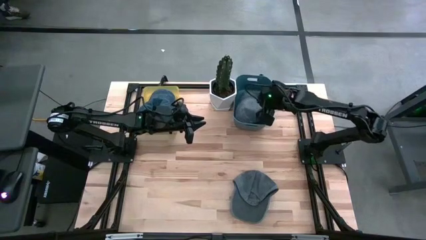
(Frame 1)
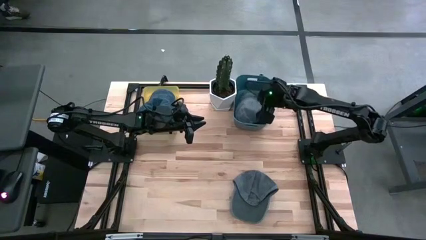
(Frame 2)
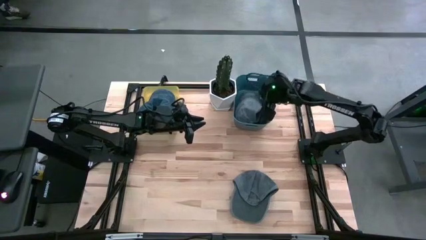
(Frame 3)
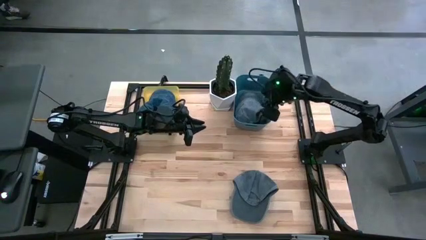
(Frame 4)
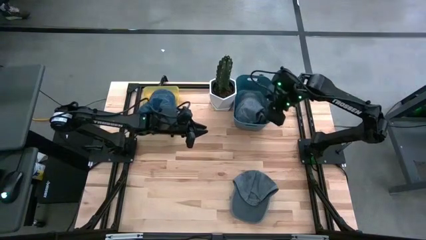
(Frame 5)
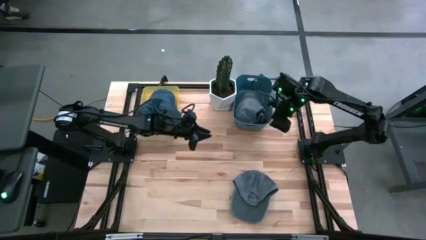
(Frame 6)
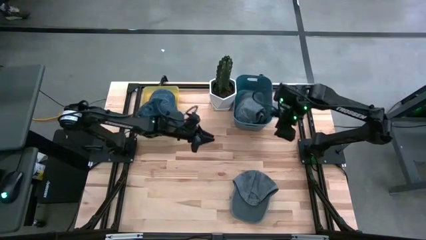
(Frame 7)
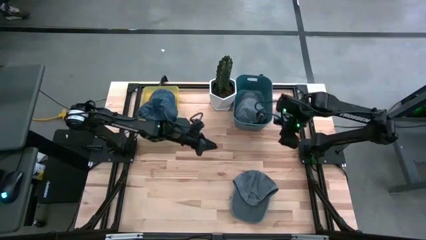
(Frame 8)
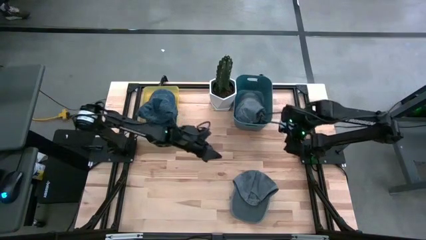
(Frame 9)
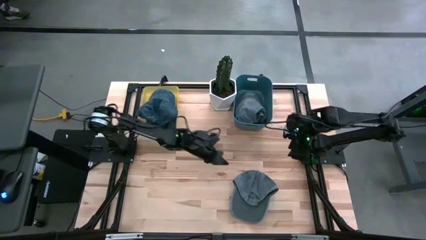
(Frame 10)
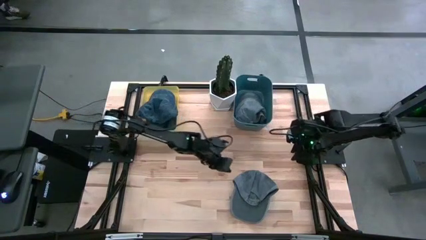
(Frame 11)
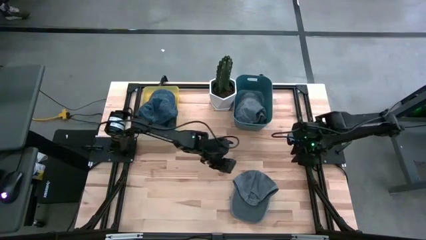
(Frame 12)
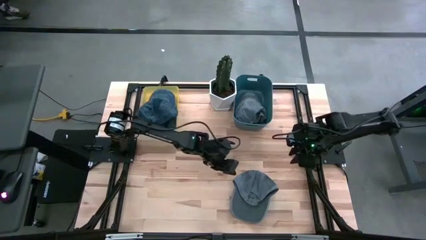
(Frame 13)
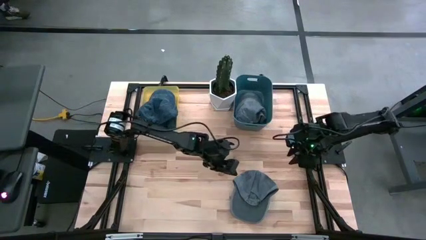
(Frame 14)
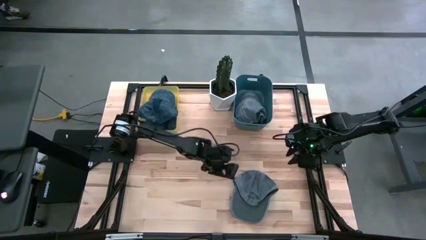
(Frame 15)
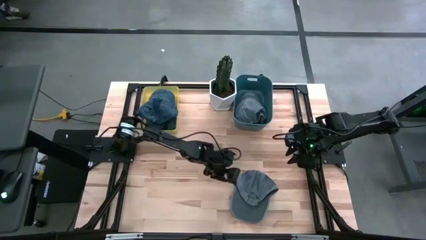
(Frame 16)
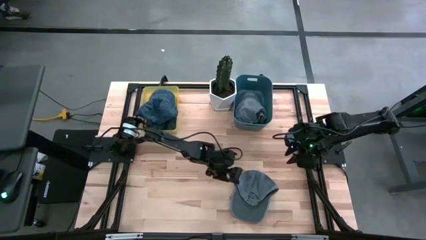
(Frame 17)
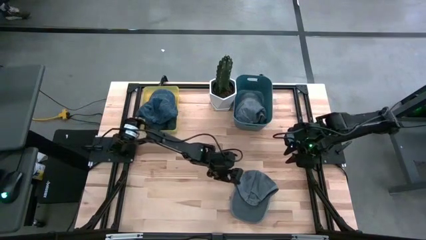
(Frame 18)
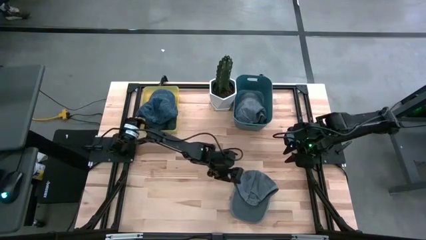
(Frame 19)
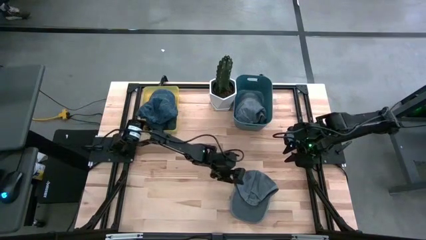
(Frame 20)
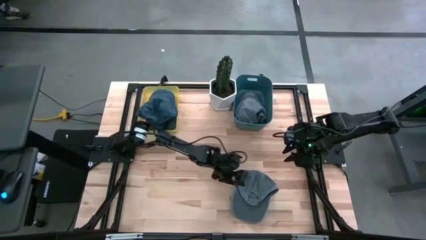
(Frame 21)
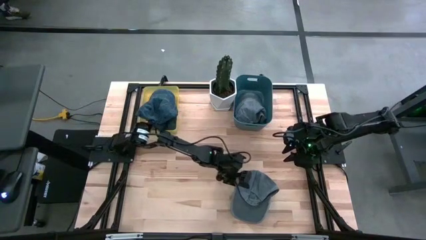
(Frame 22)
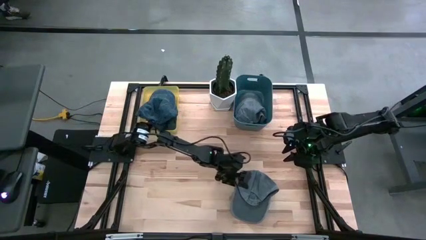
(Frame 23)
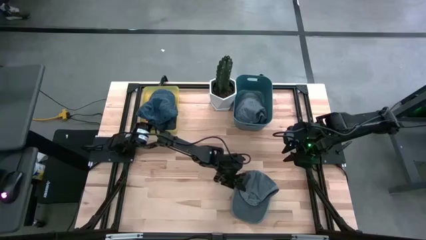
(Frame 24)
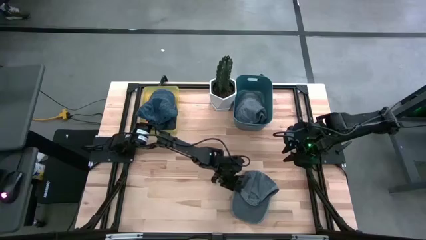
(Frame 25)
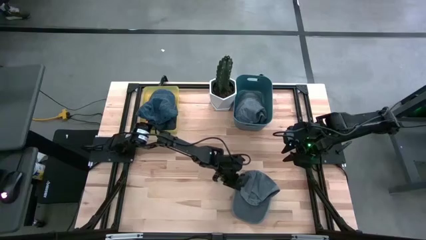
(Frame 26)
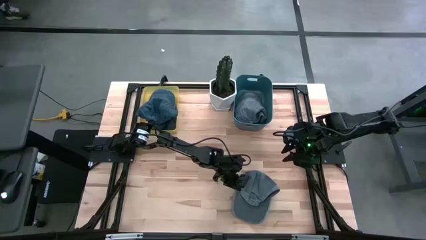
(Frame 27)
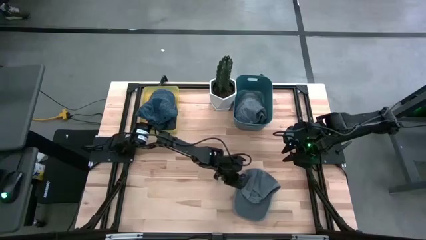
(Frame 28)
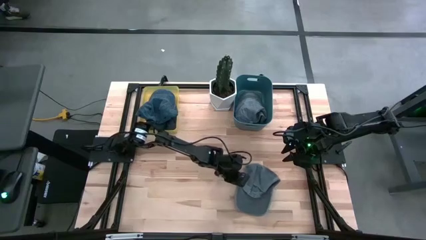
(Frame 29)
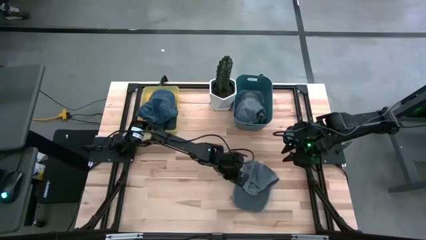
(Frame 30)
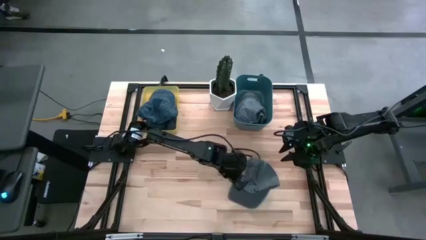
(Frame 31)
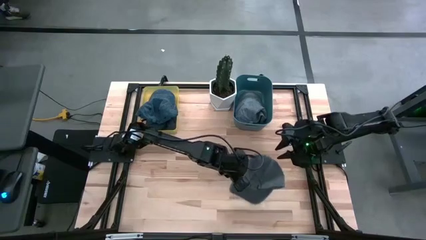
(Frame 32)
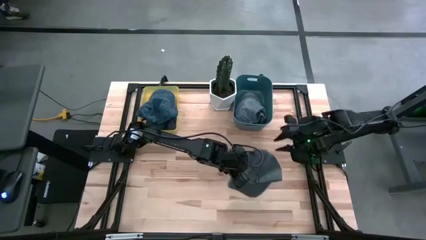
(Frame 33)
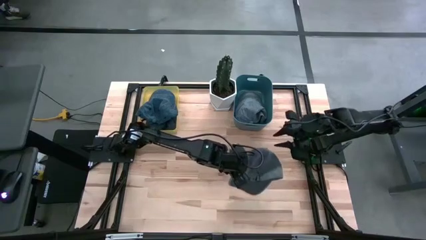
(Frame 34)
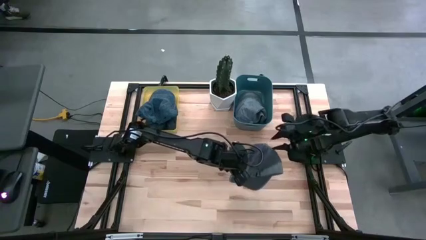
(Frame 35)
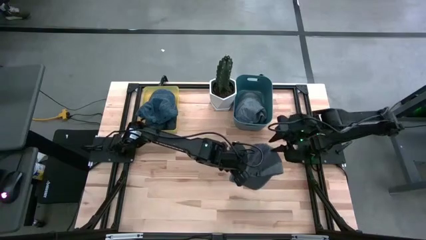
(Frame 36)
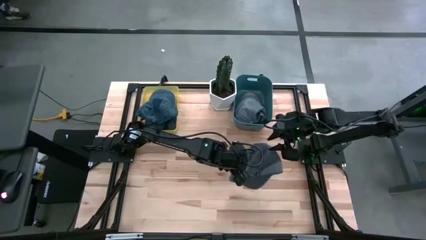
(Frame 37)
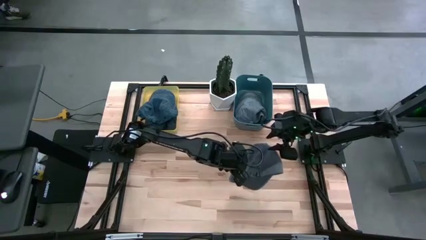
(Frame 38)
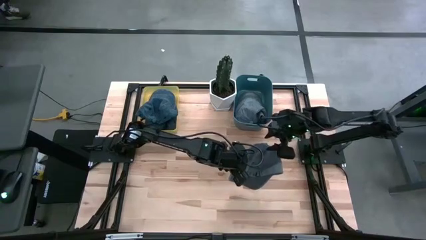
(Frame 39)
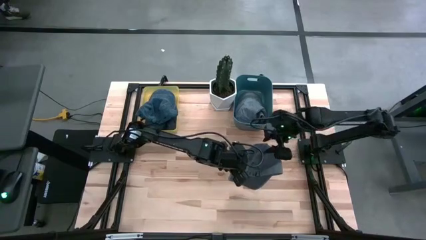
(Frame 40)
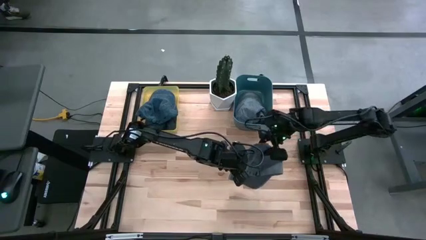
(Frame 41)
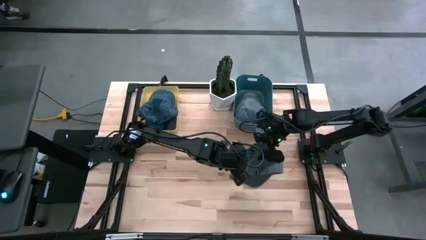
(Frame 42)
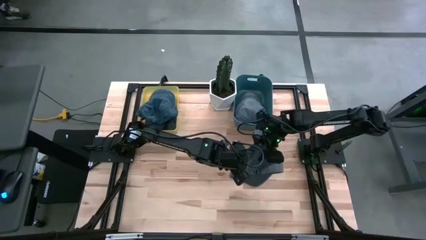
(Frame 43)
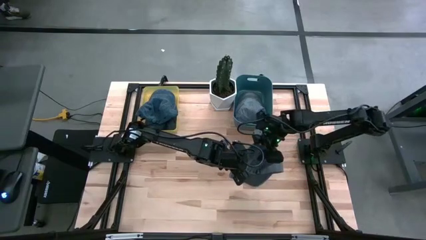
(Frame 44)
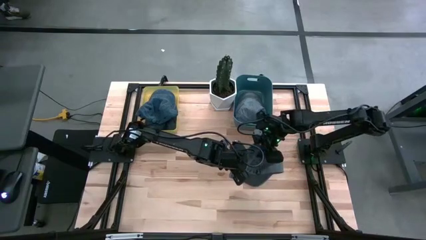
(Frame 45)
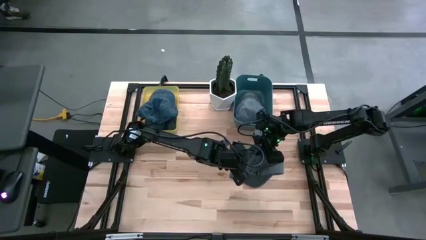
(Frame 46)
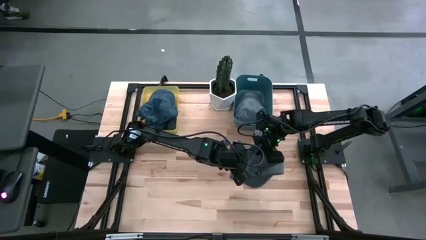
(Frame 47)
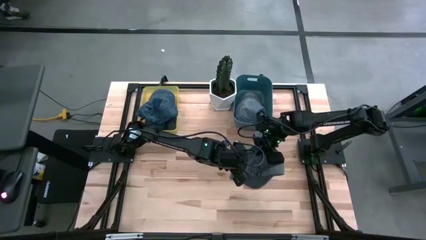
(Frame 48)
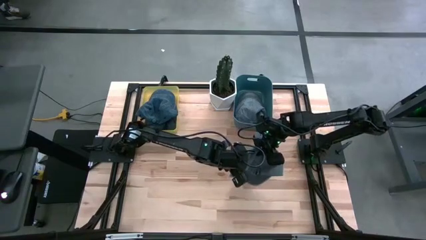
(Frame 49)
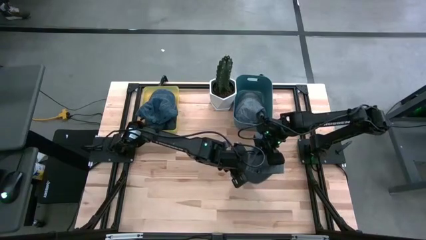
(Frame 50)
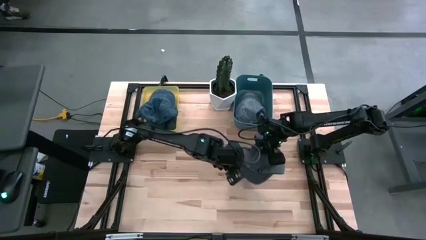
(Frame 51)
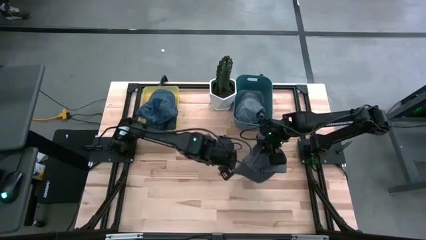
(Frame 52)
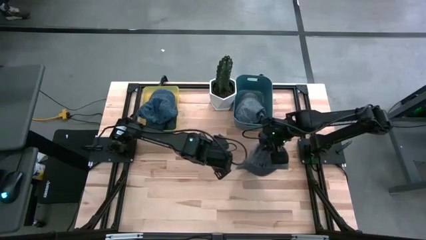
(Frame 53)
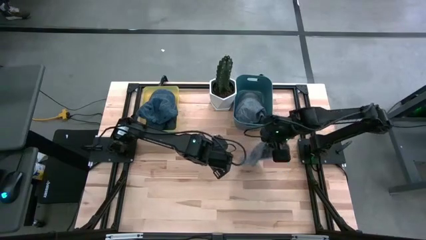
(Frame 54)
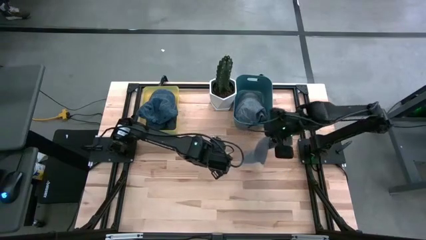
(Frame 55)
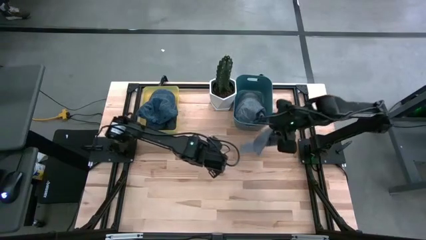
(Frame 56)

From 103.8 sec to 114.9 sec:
Task: Pick & Place hat
Put the gray cap into the blue bin

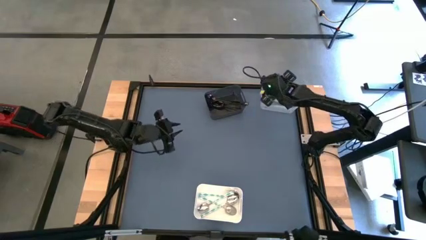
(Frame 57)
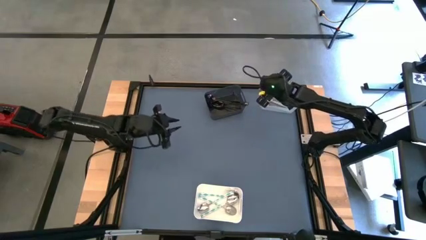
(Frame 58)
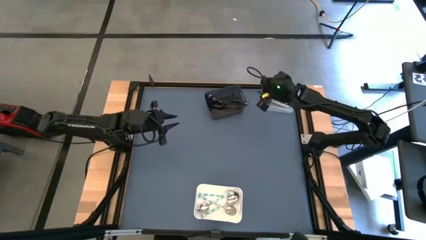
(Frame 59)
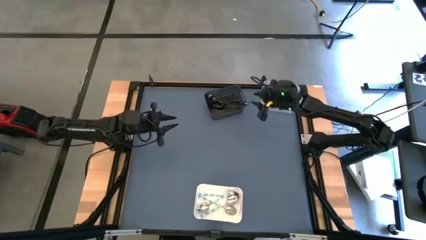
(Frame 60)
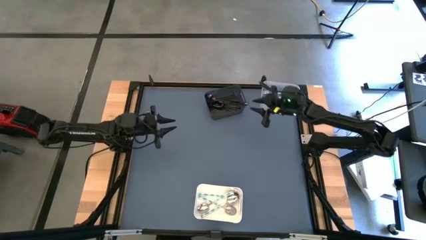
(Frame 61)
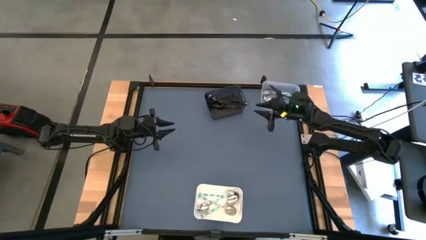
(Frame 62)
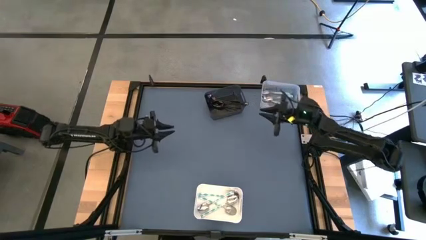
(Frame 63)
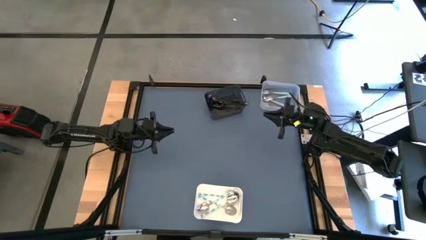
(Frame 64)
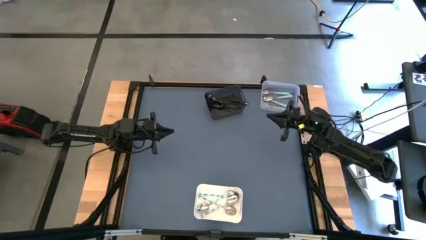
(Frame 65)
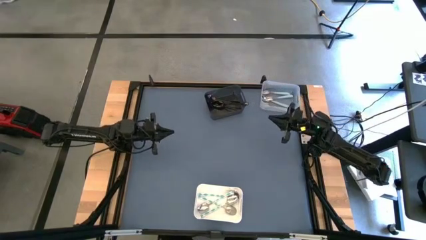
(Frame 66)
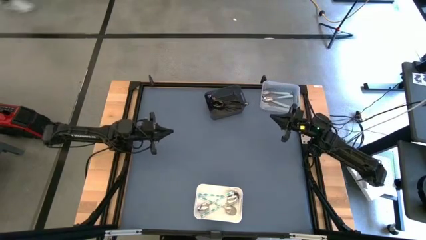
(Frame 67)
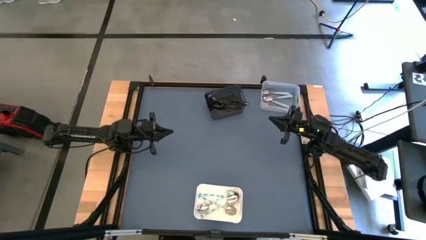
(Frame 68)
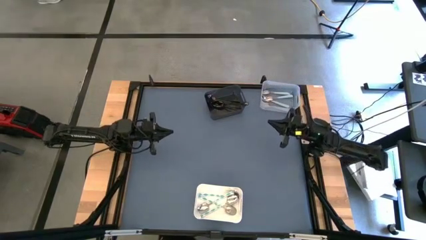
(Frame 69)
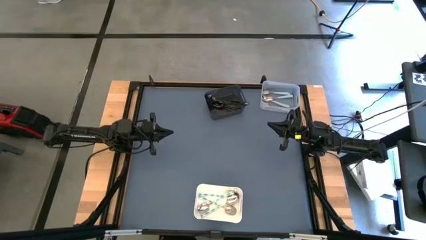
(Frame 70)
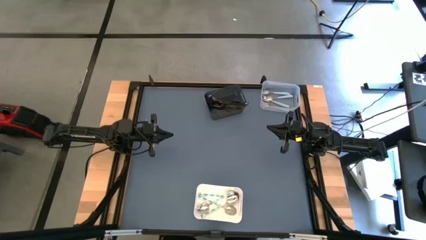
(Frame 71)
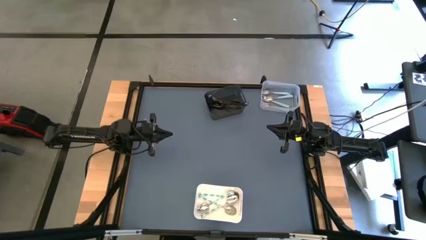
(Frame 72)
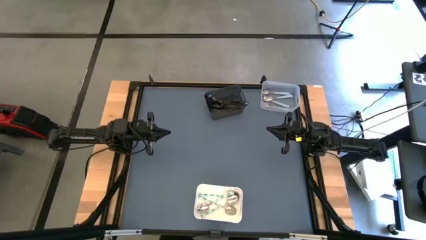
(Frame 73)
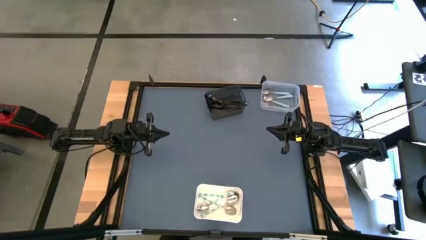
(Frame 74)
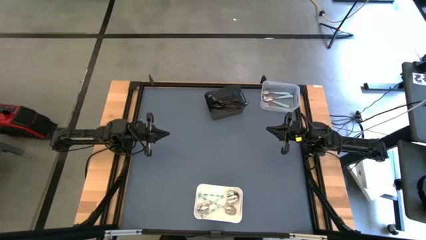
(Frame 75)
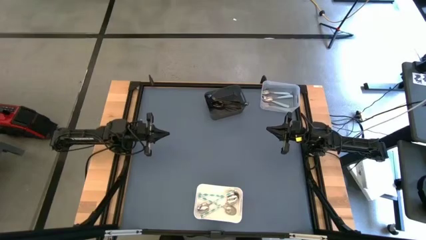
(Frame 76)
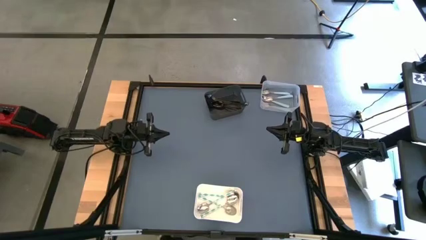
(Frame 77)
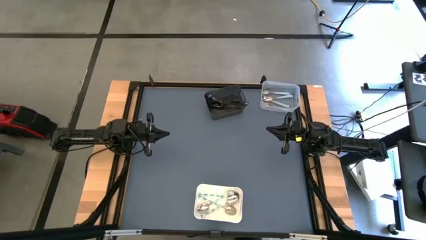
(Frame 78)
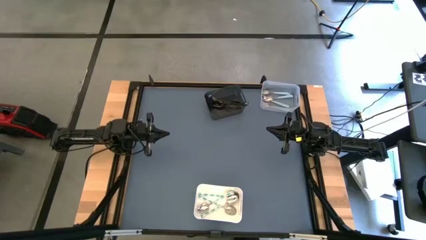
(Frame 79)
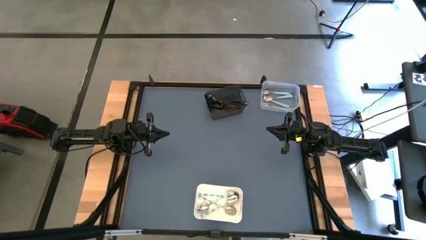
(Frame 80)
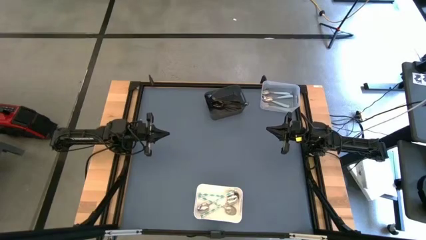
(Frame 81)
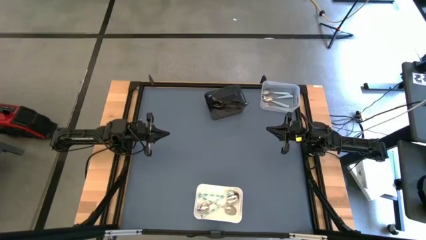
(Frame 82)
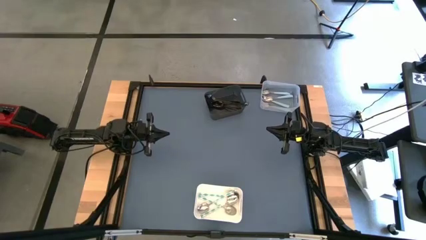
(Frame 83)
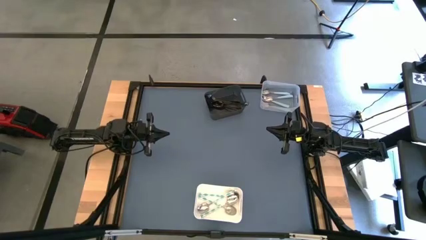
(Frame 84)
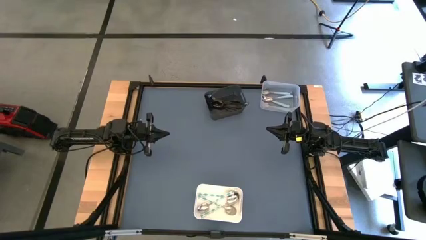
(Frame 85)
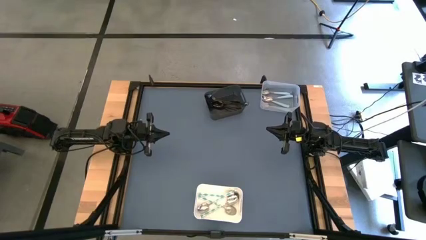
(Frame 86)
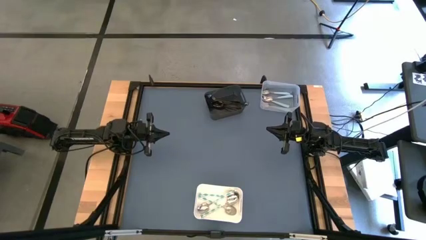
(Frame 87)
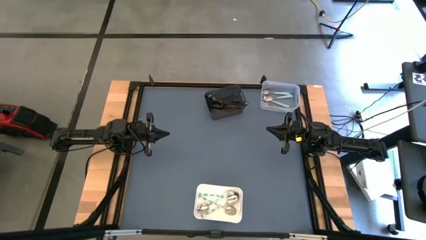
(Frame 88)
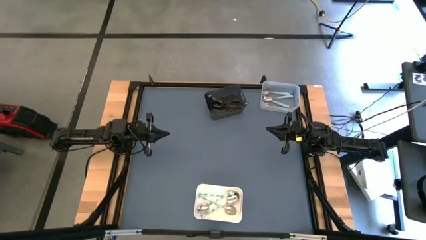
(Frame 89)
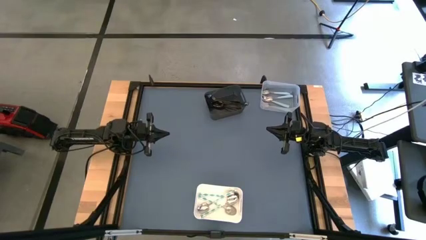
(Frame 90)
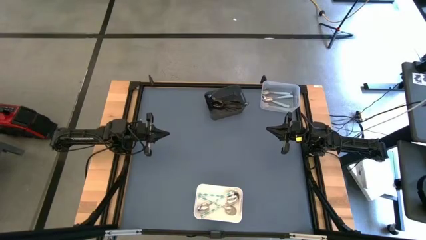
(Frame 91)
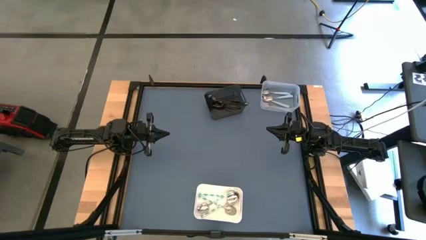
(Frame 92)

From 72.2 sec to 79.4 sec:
Task: Sort silverware by color (type)
Return to Home Position
